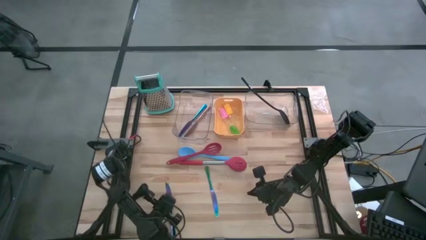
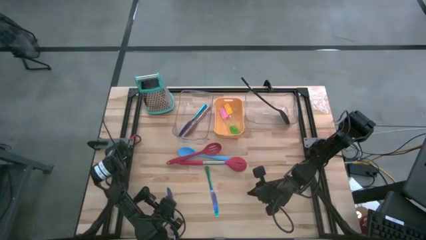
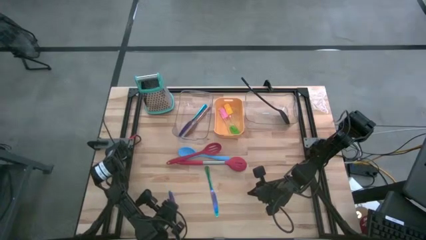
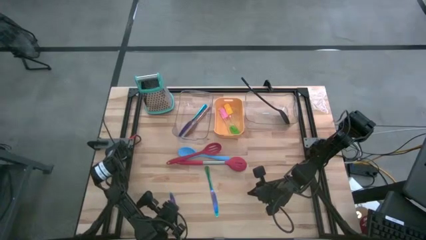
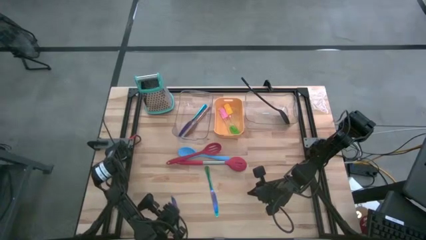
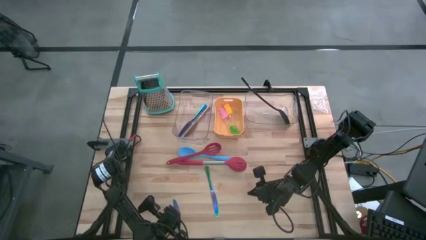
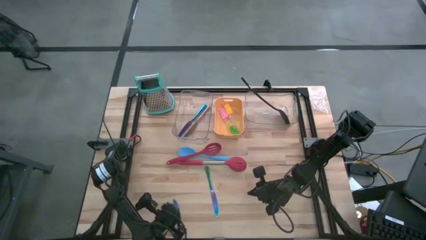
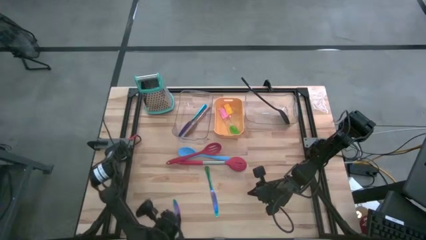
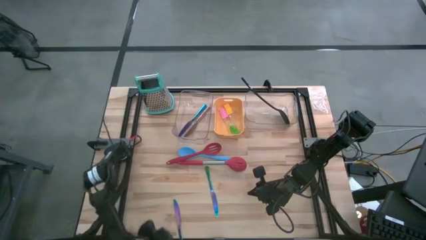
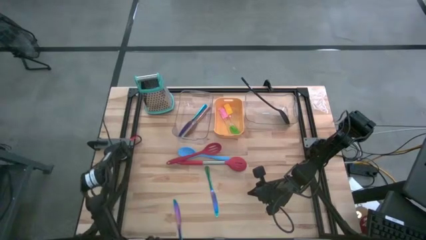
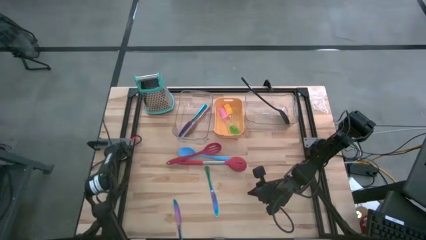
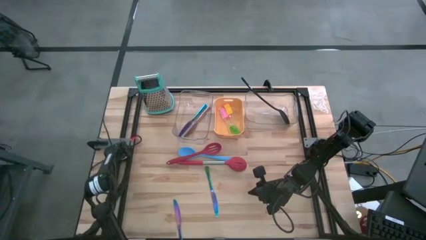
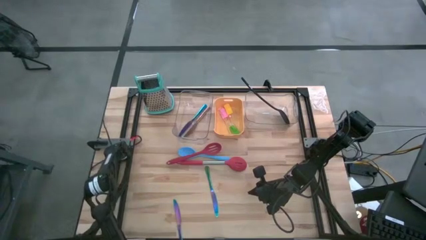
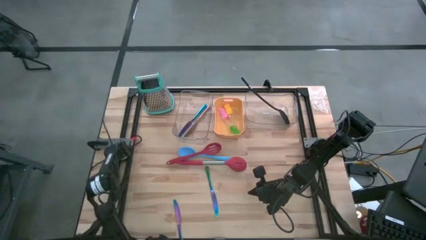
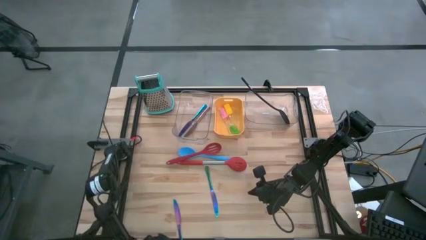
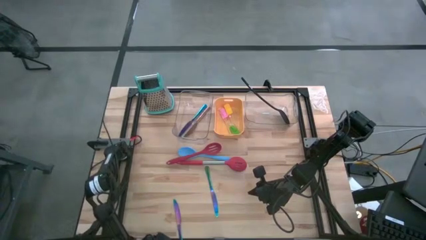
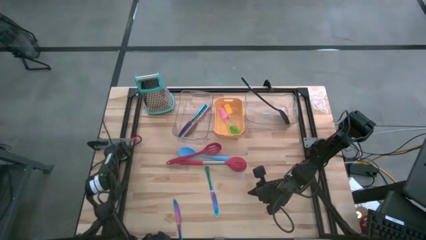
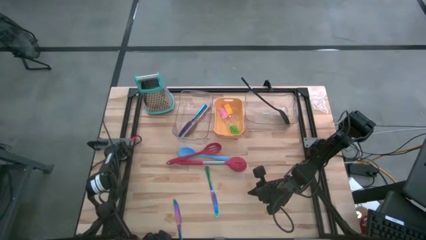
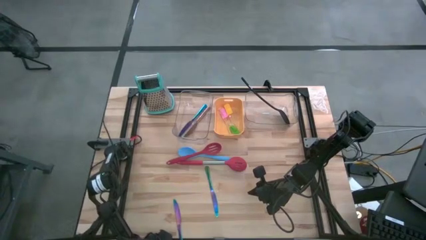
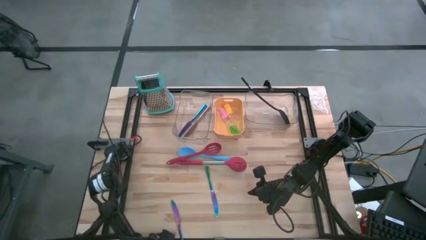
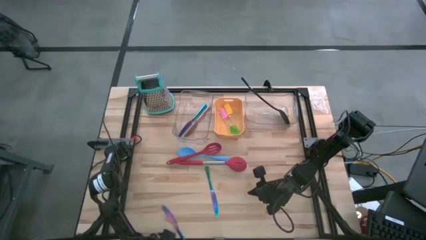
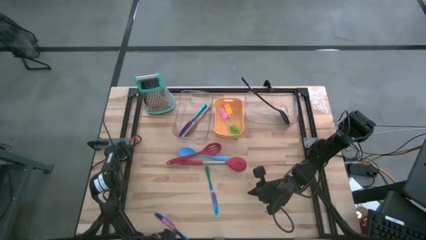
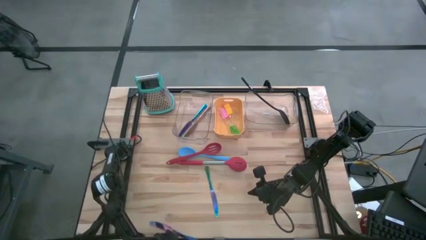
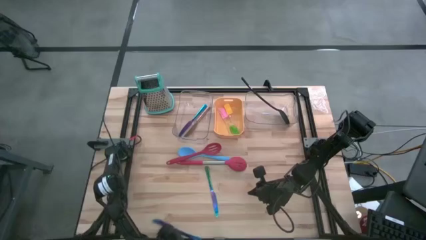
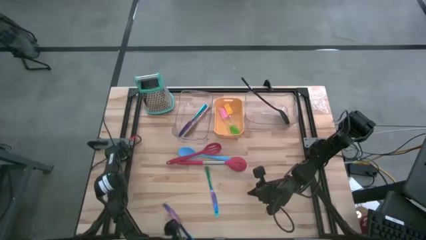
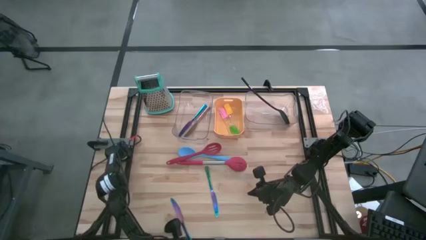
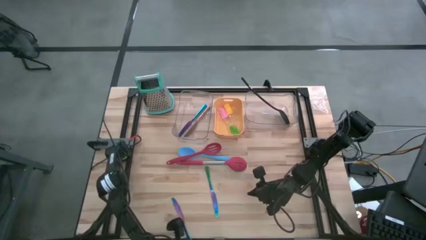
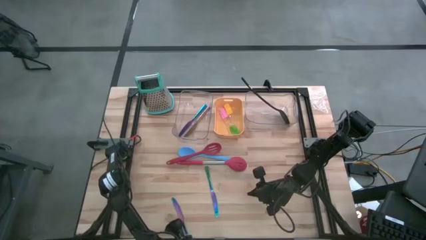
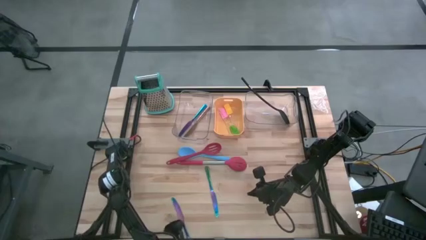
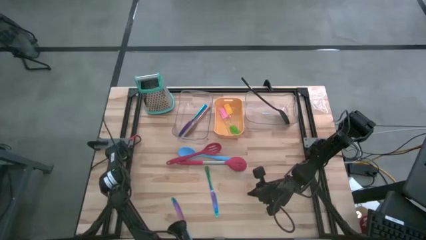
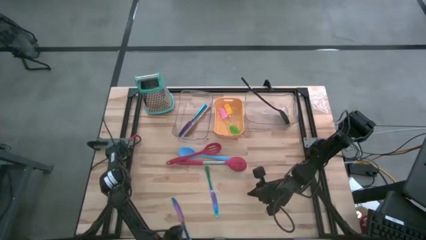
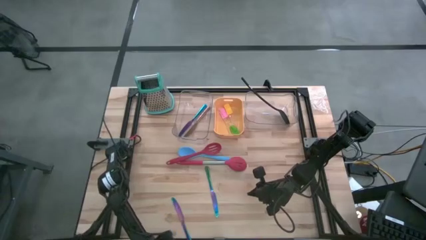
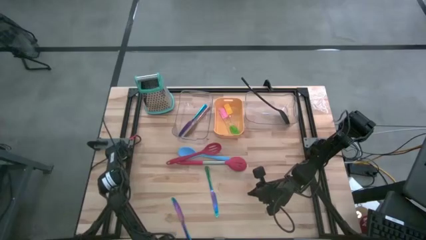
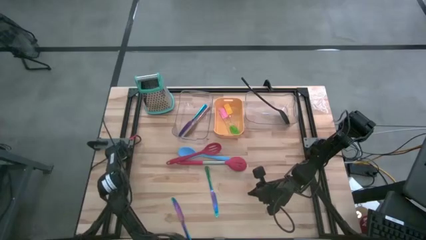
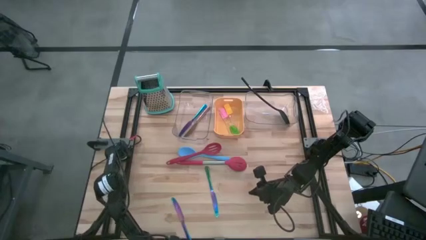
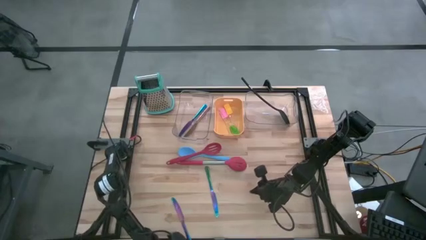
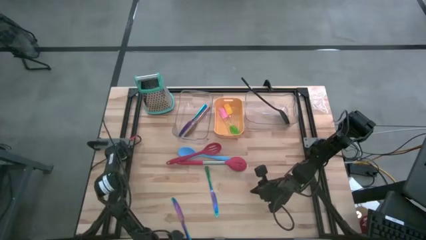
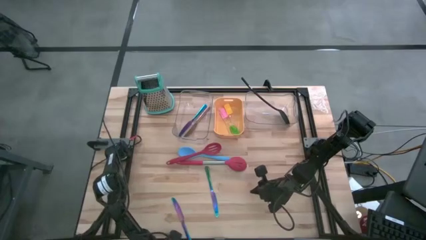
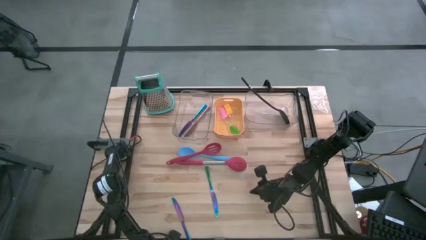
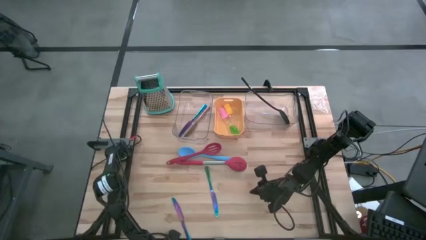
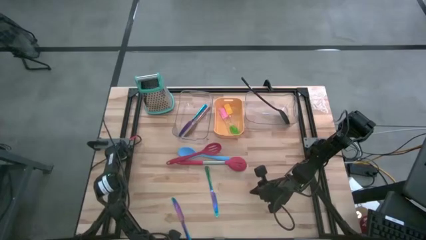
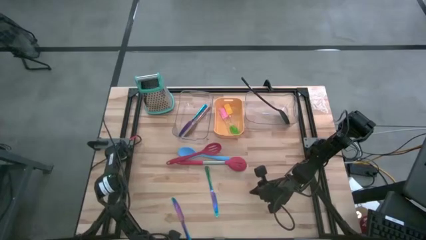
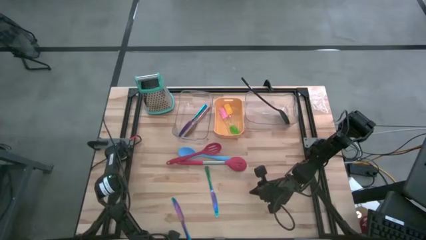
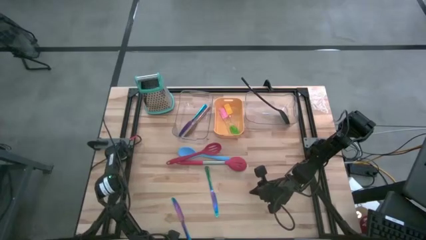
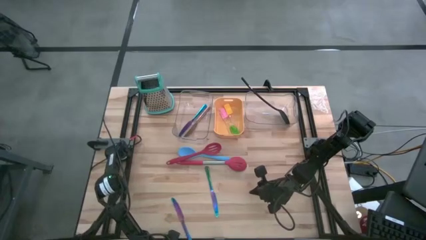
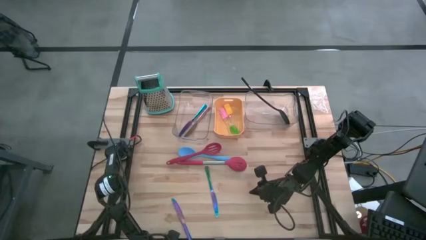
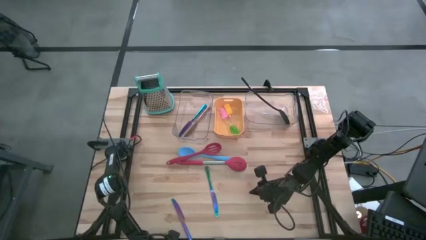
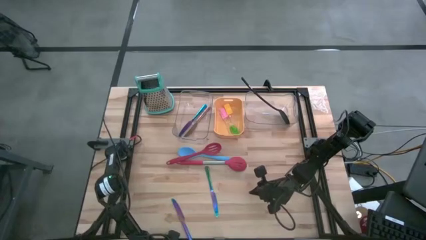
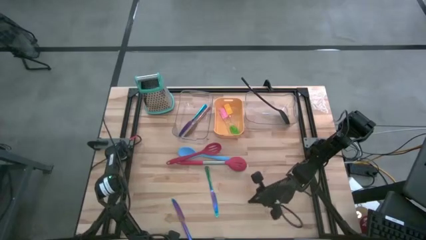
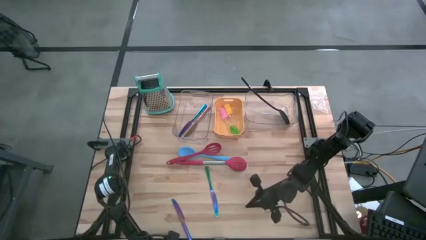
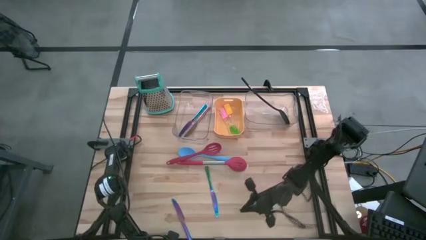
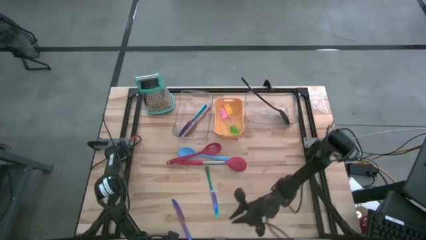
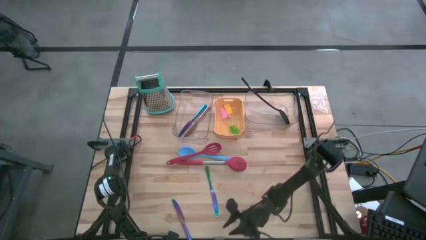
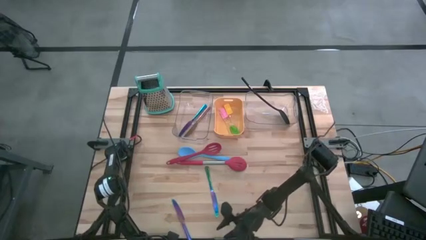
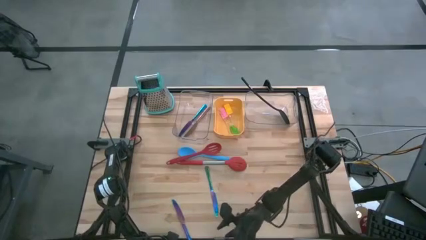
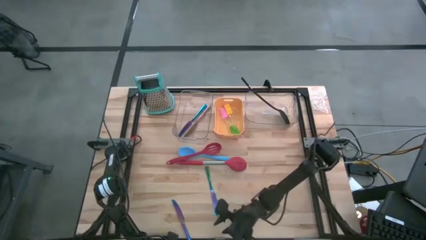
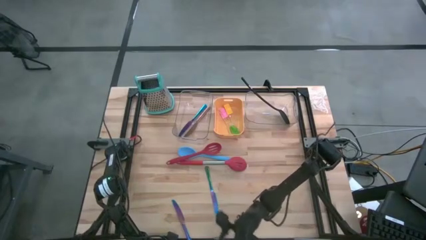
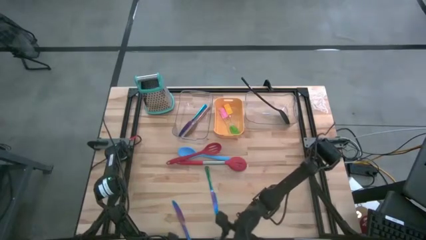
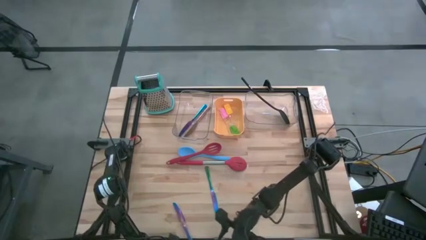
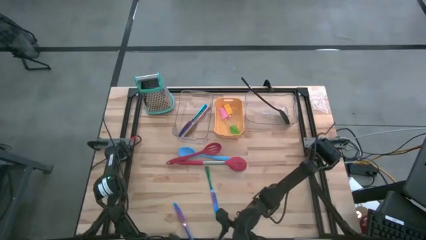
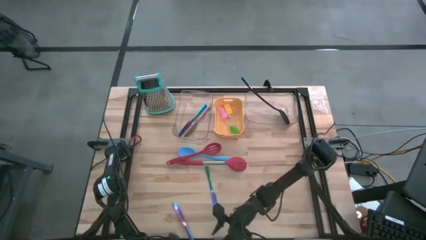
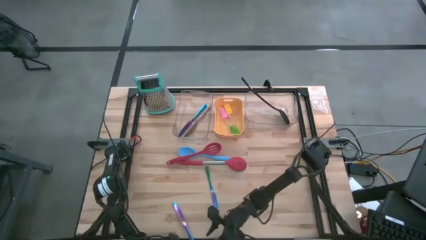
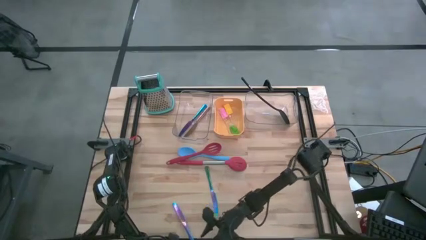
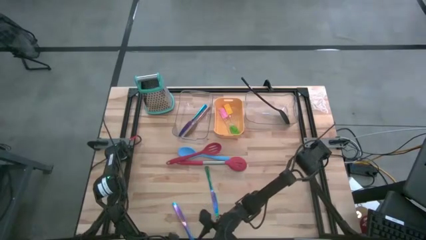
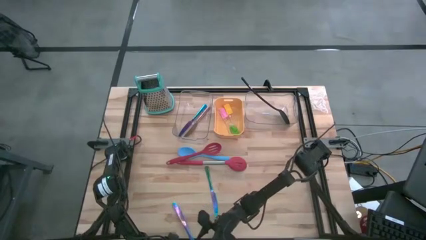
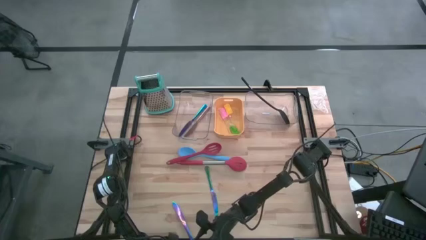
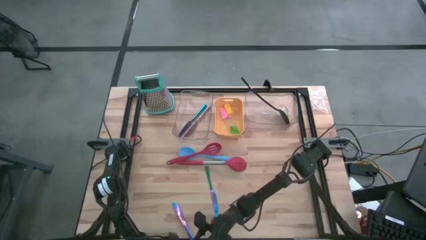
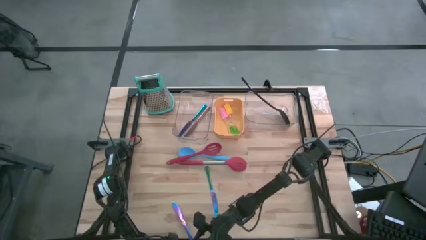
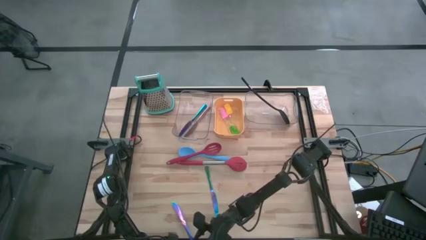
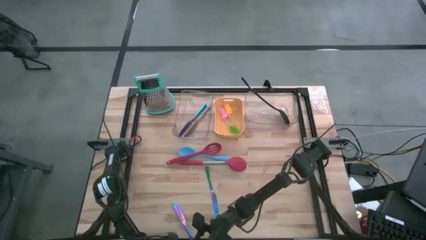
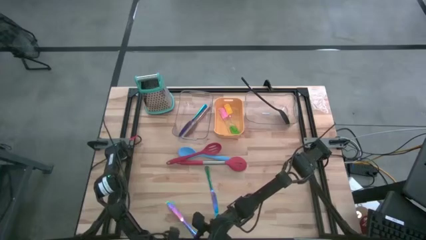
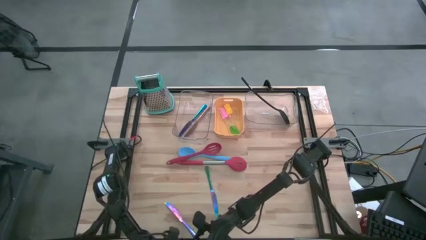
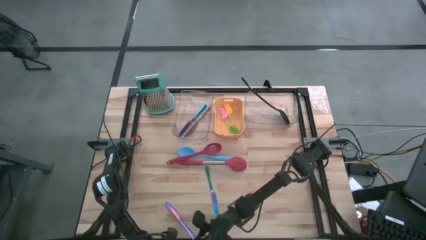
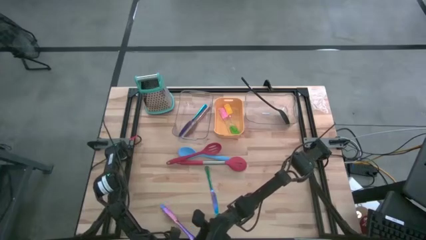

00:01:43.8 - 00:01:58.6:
Task: Pick & Place Kitchen Items
Put the left blue knife into the left transparent bin
